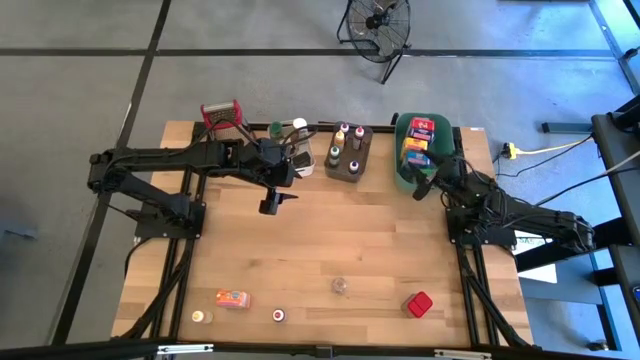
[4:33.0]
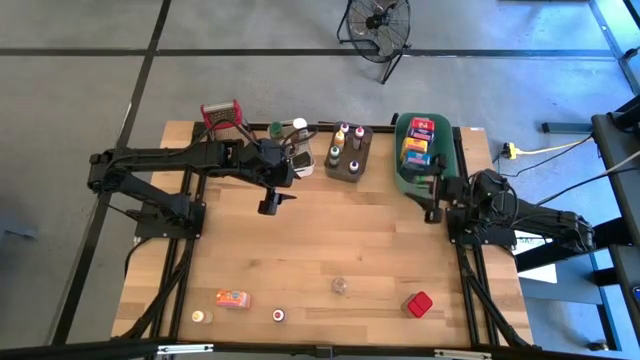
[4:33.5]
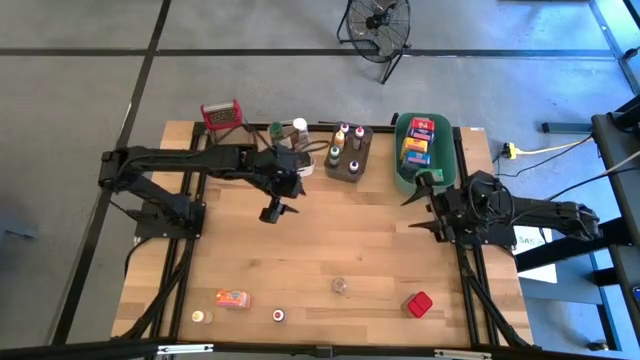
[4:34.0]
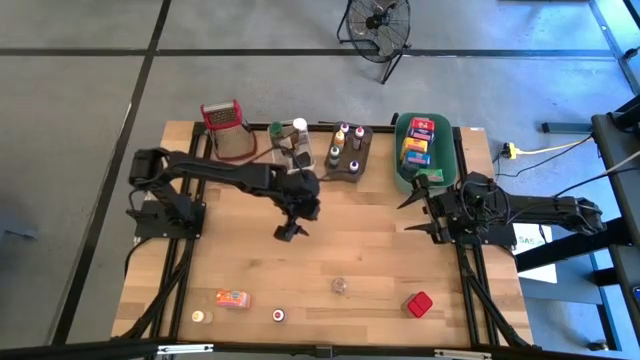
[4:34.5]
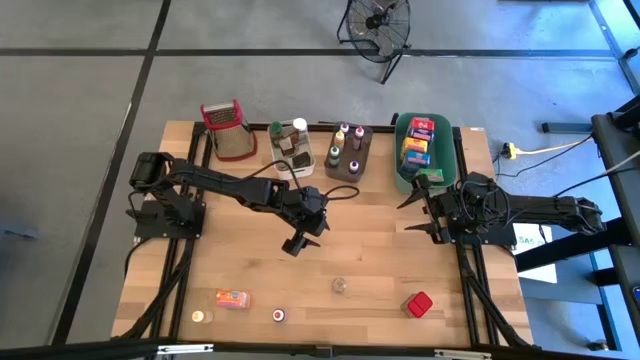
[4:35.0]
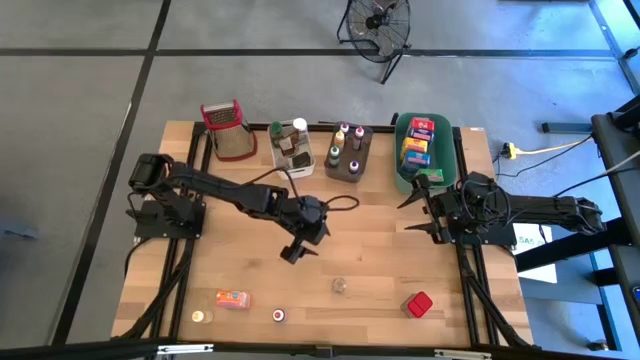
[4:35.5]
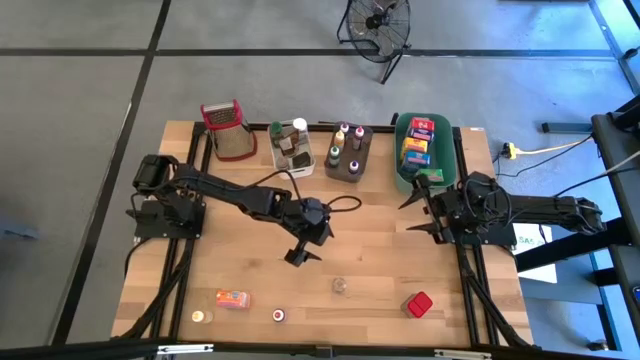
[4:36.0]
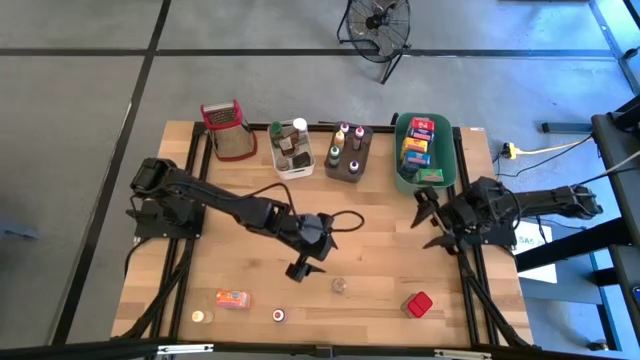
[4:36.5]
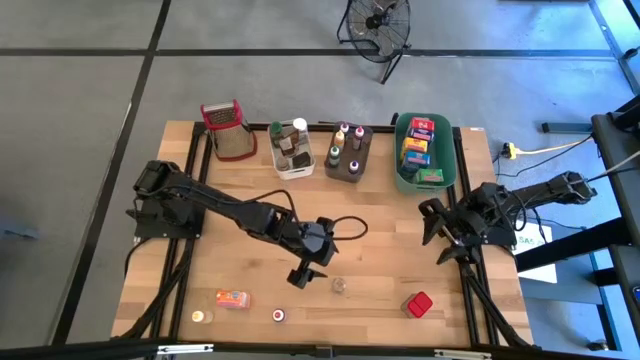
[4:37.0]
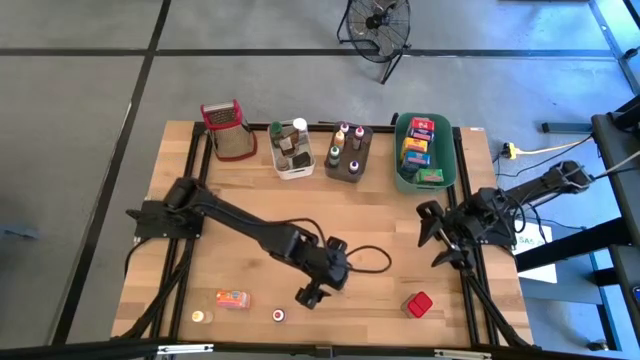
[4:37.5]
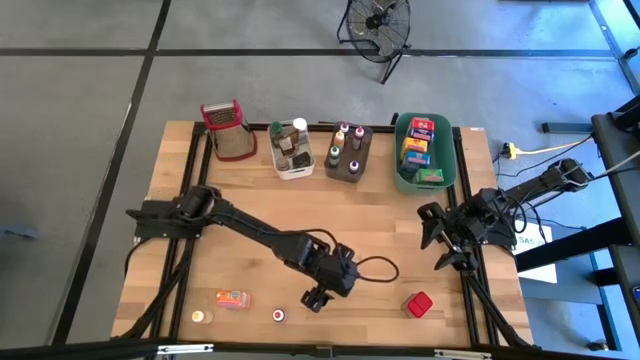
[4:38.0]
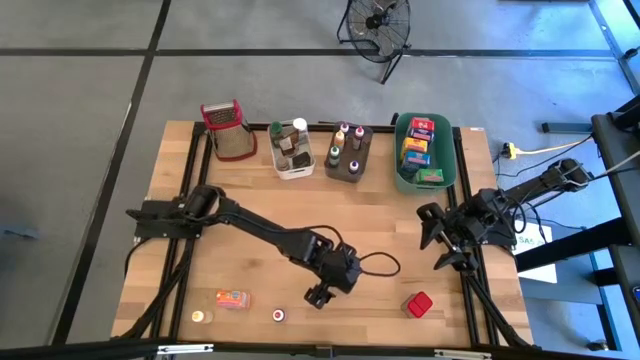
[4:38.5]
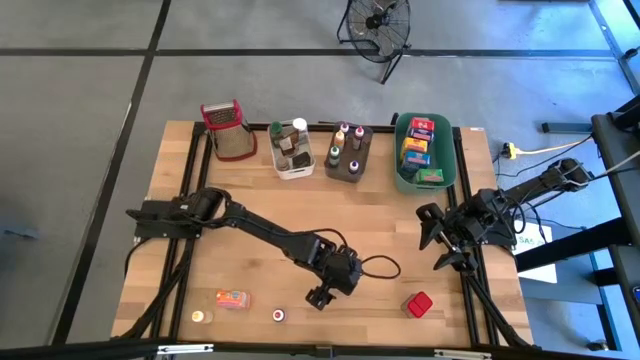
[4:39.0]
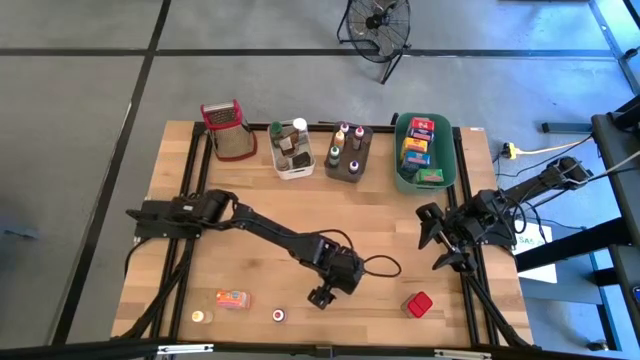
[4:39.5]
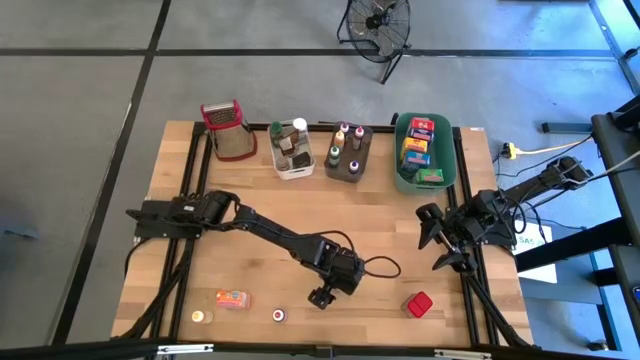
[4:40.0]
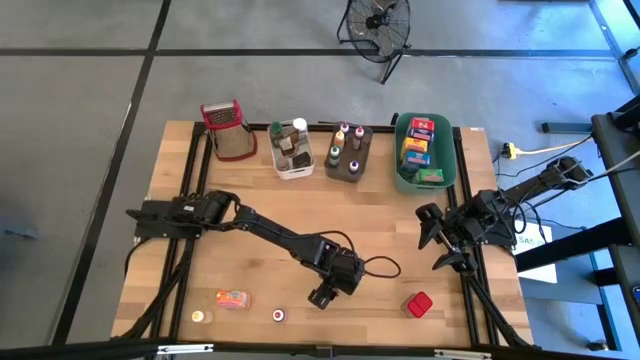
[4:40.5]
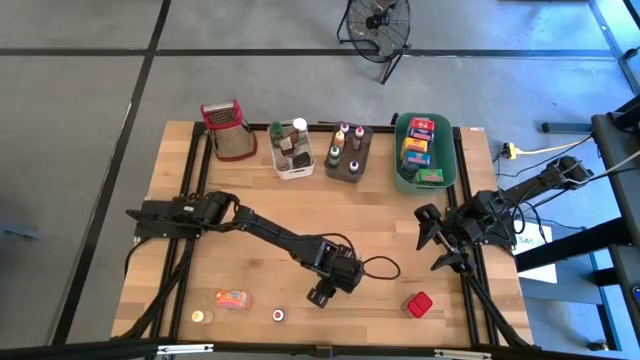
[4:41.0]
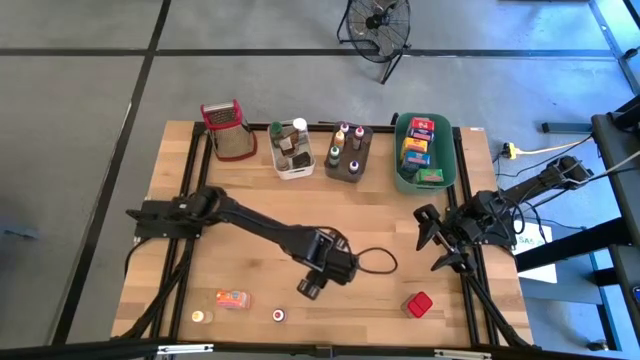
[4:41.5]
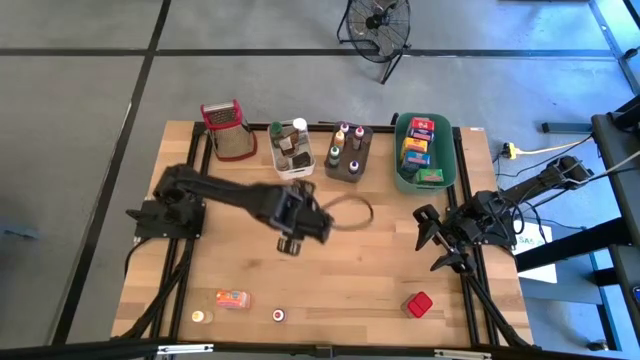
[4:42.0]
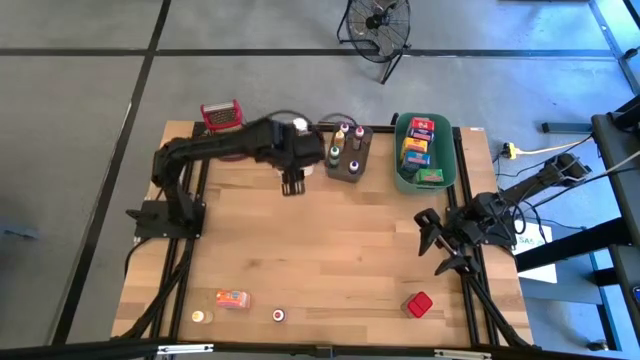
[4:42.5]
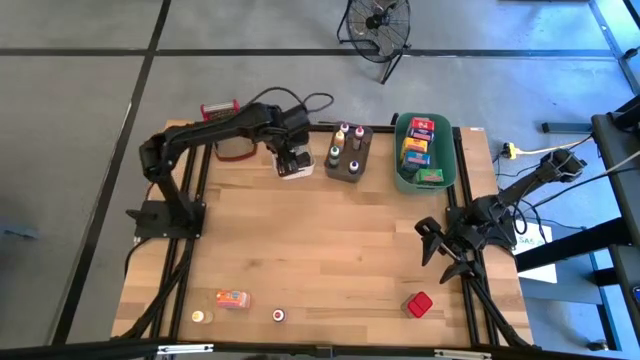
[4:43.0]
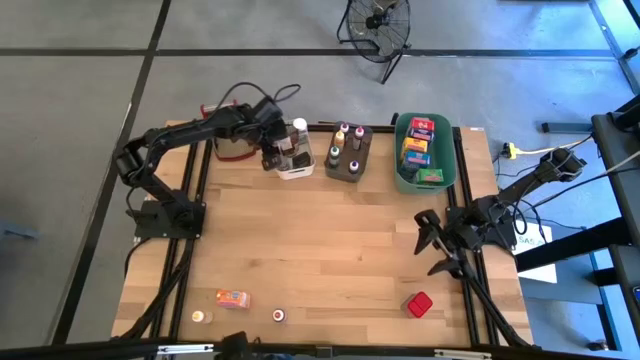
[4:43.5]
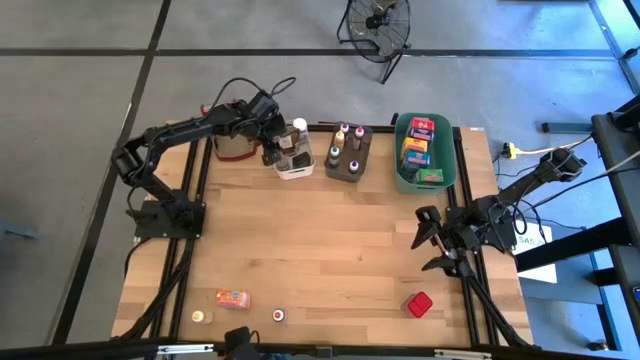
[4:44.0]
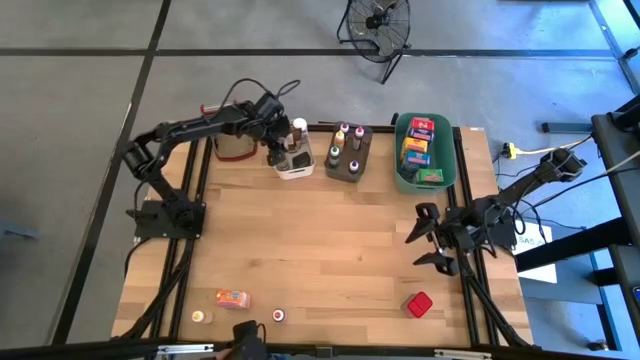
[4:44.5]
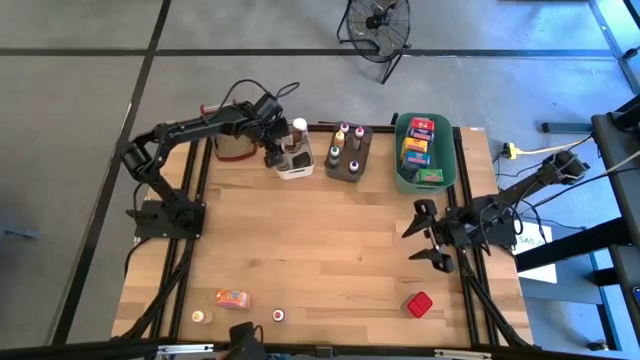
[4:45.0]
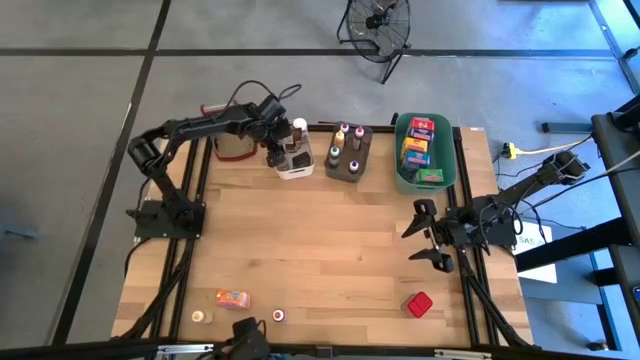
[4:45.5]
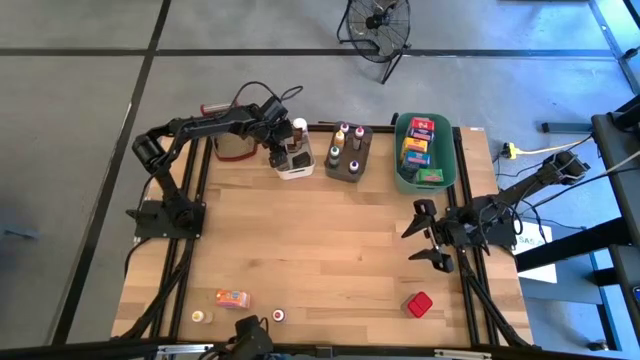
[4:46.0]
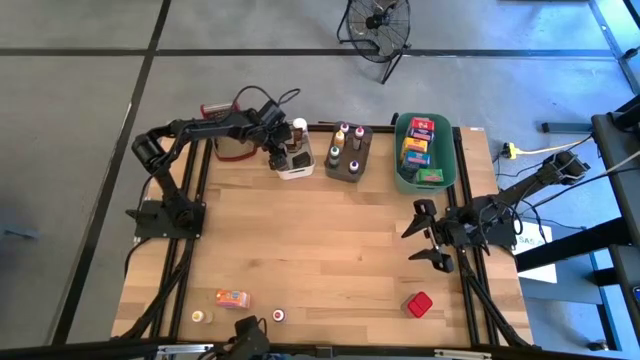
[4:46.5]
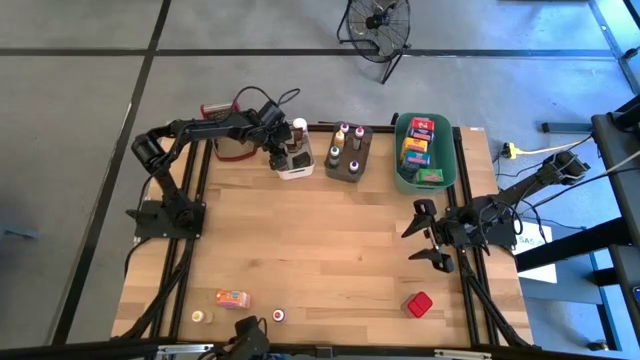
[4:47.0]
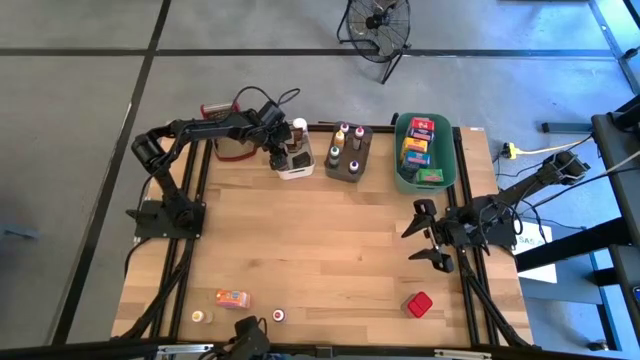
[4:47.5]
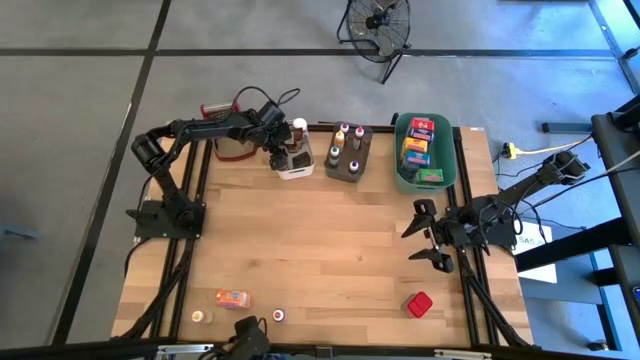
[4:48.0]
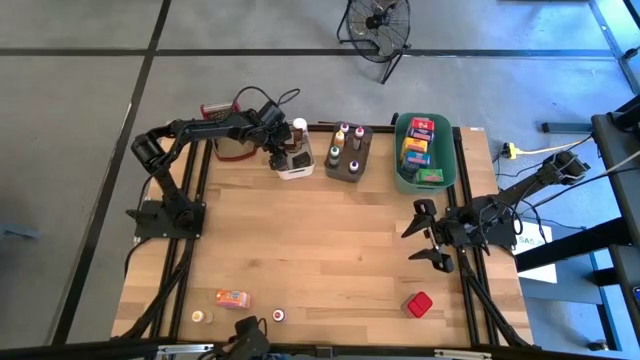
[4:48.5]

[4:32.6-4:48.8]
Task: Pick & Place Kitchen Items
Put the transparent seasoning bottle into the white bin
